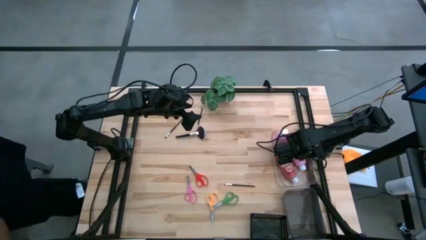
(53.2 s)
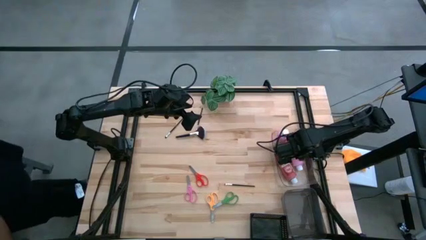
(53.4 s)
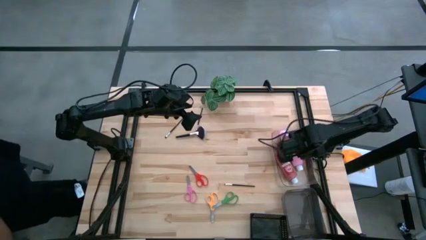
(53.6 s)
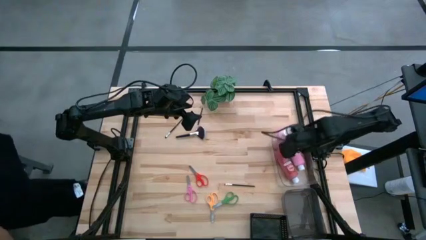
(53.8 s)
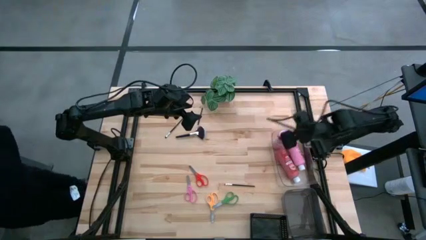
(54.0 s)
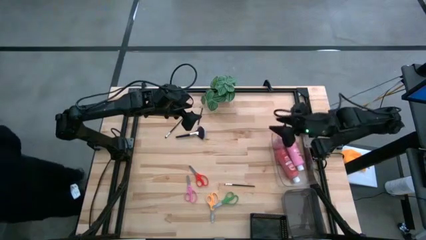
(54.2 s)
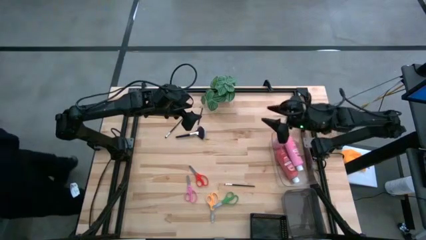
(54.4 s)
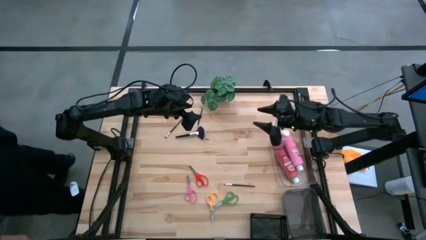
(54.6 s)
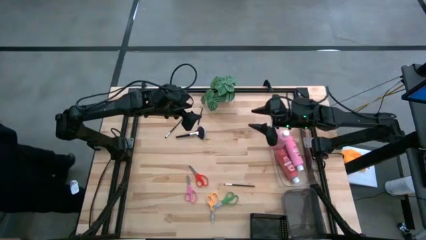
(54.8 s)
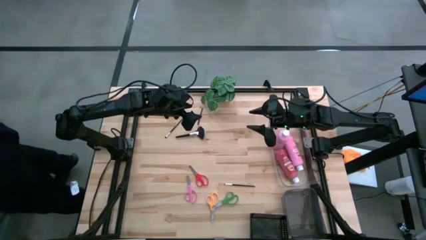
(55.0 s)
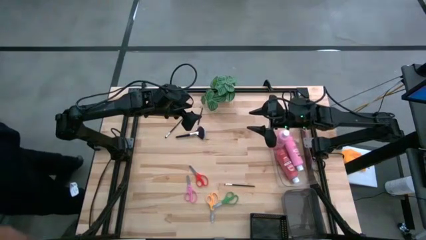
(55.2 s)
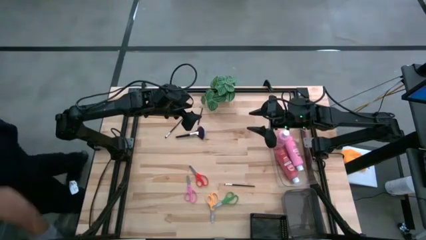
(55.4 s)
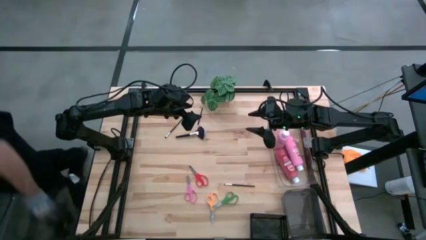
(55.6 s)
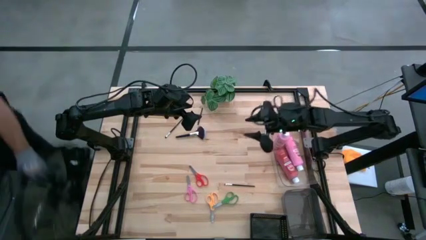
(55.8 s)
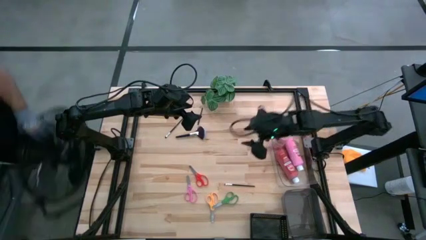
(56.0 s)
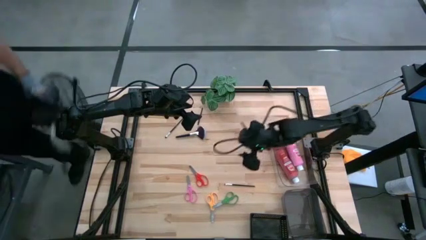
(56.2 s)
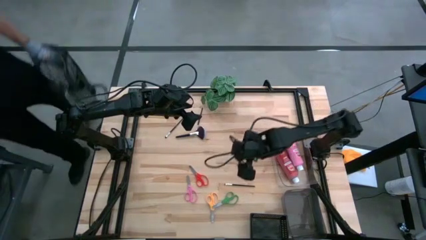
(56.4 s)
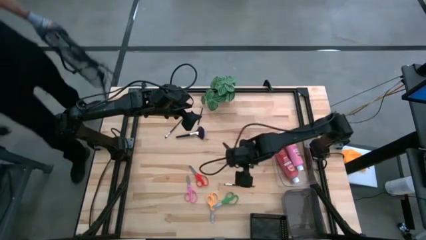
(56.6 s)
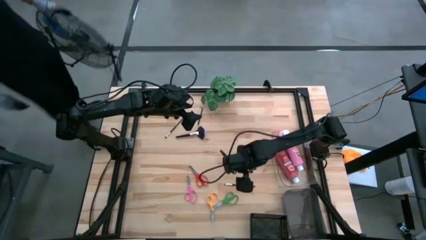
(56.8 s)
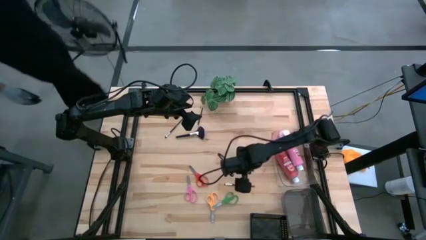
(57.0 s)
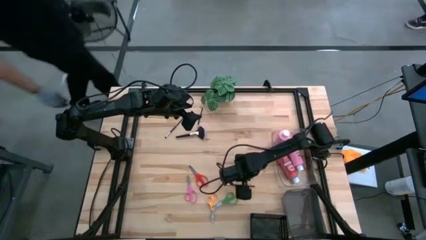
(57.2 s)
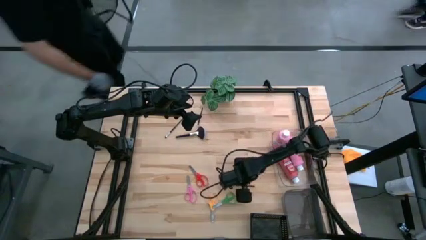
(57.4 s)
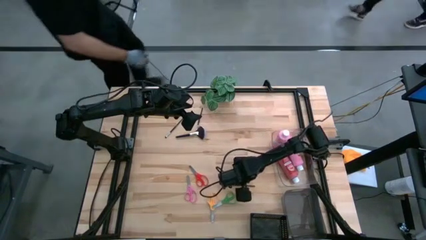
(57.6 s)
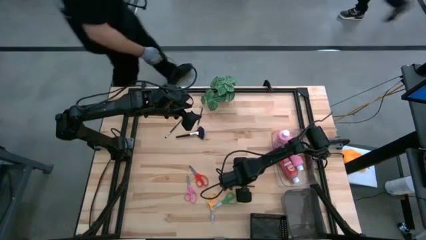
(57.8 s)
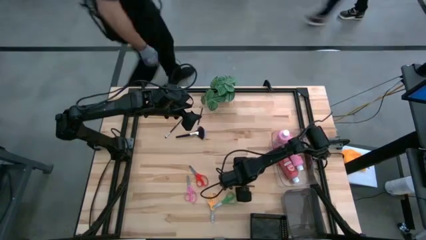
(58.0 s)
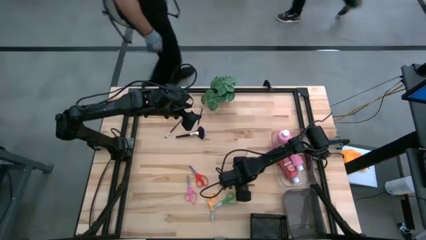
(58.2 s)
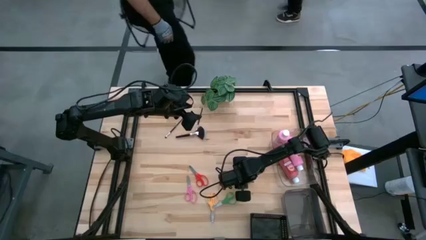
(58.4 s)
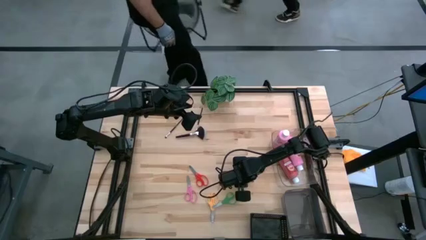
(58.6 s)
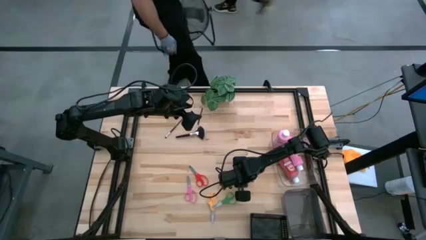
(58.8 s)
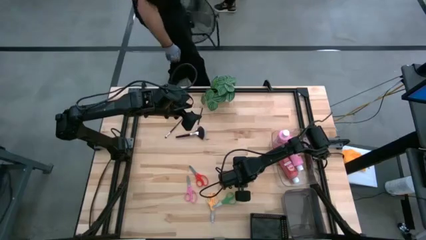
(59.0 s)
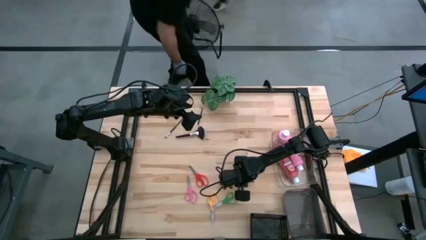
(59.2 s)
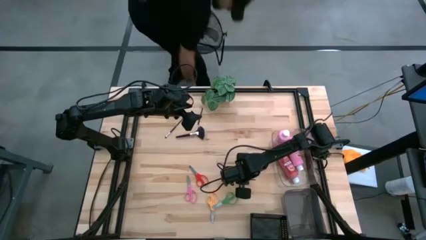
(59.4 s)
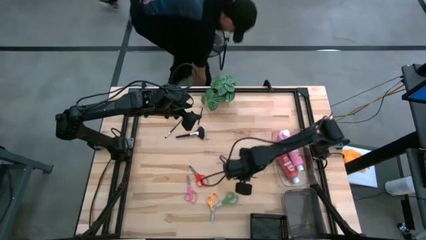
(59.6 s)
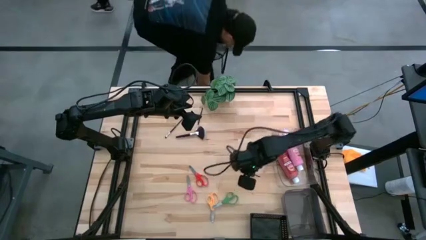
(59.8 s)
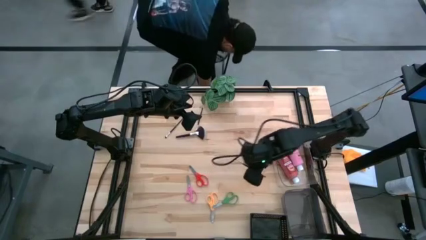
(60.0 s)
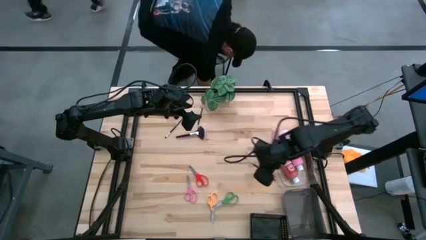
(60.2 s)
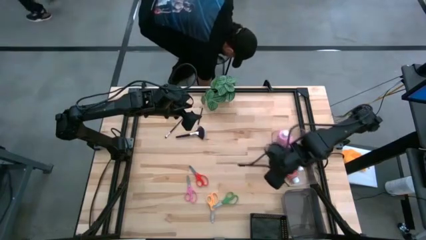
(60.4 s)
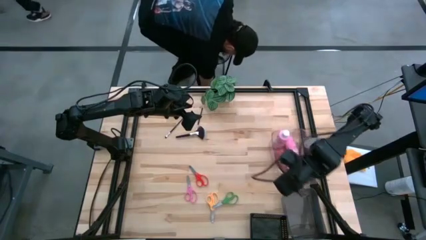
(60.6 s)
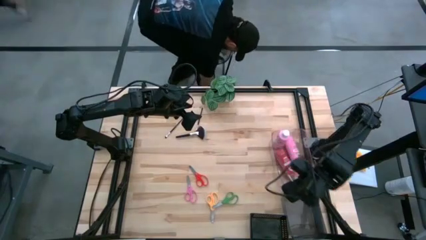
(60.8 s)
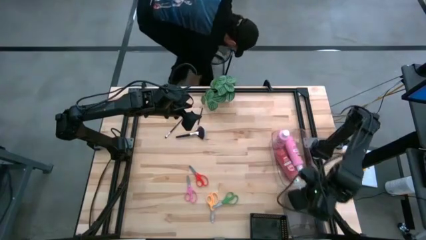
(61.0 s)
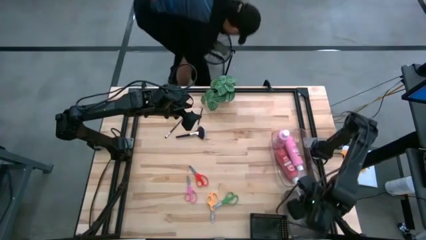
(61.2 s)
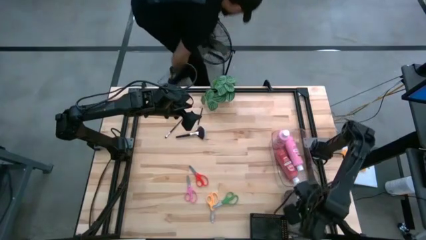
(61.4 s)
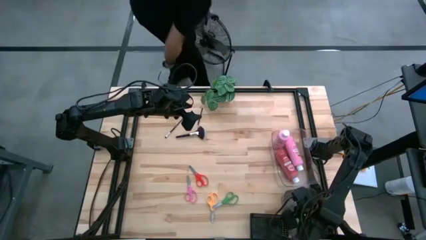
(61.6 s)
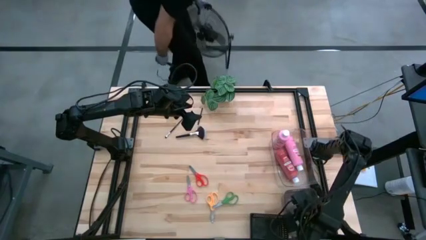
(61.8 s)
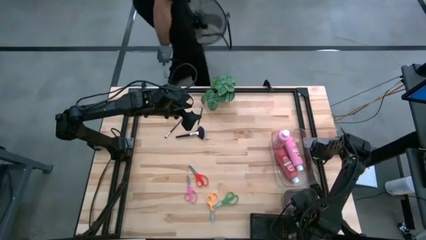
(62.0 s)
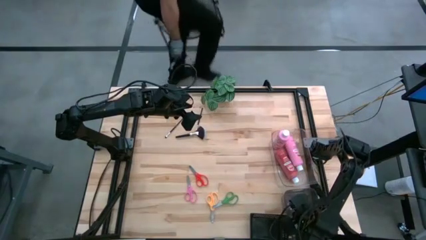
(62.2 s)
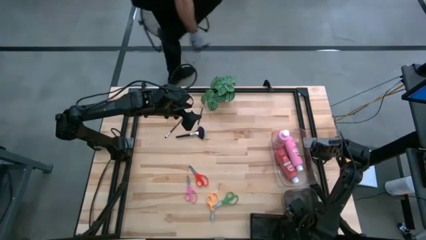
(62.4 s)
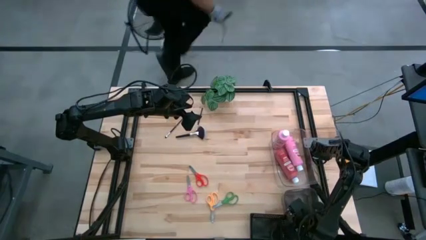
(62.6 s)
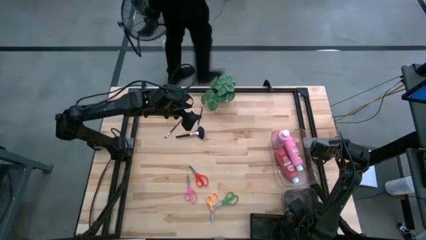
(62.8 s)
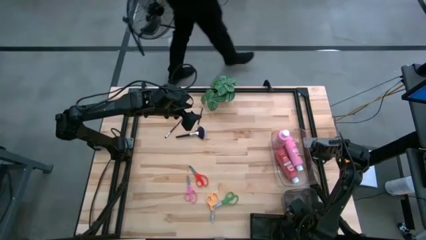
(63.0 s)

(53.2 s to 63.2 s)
Task: Pick & Place Paint Supplies
Put the black paint brush into the gray bin
